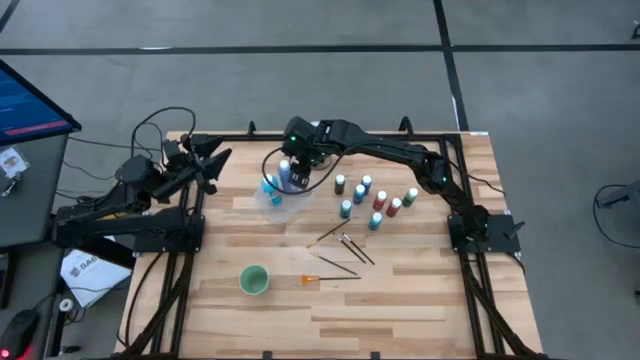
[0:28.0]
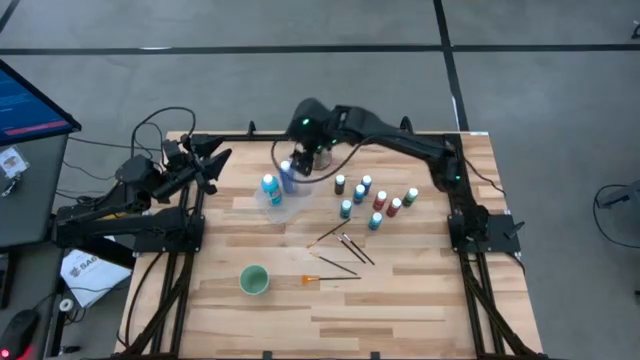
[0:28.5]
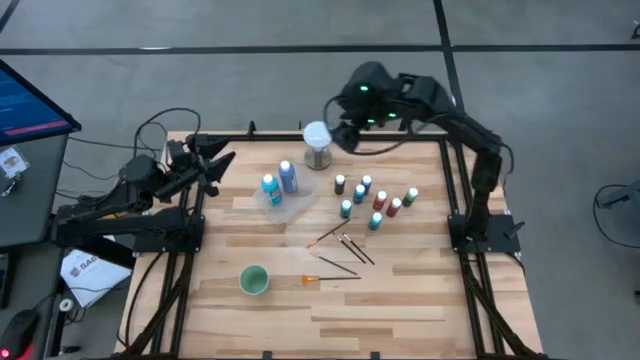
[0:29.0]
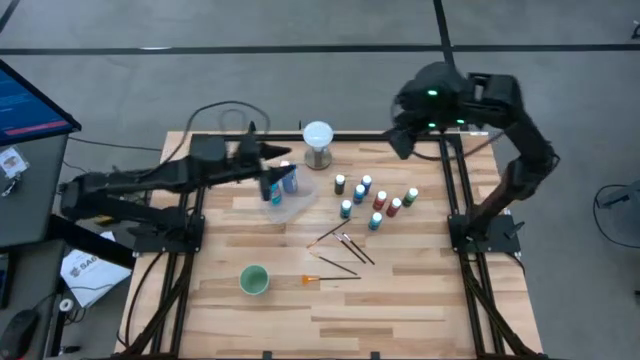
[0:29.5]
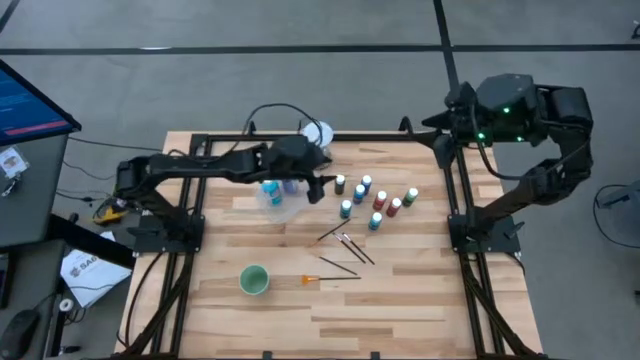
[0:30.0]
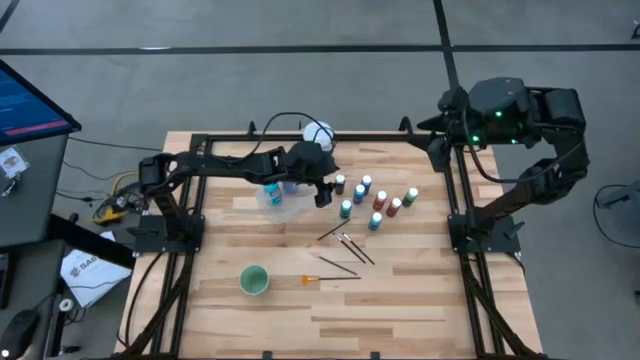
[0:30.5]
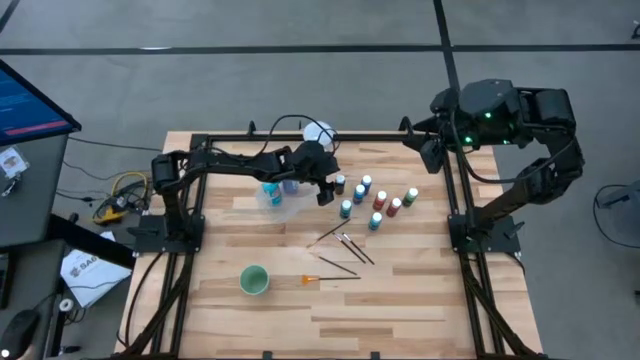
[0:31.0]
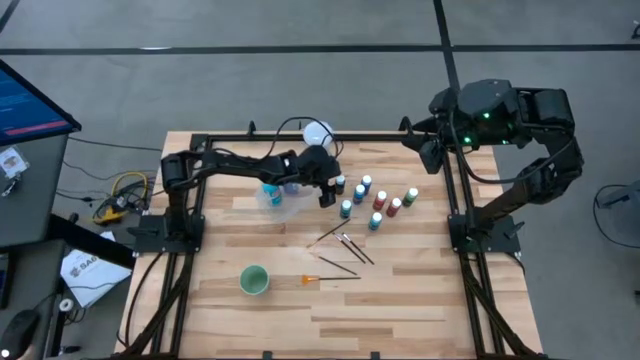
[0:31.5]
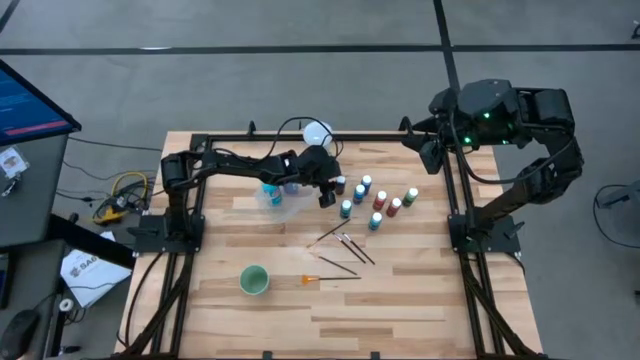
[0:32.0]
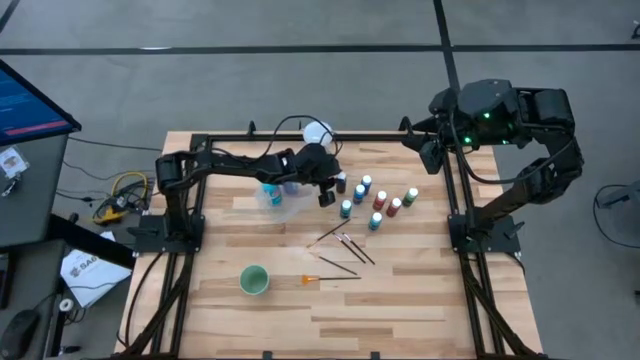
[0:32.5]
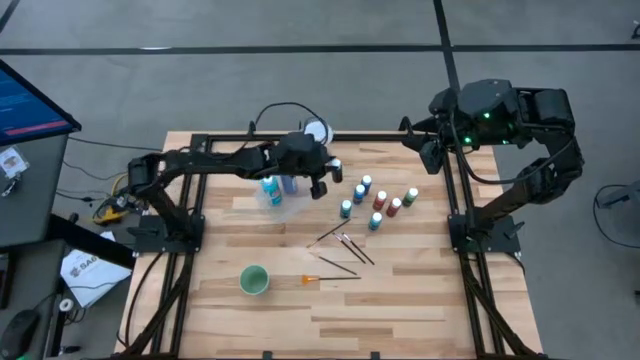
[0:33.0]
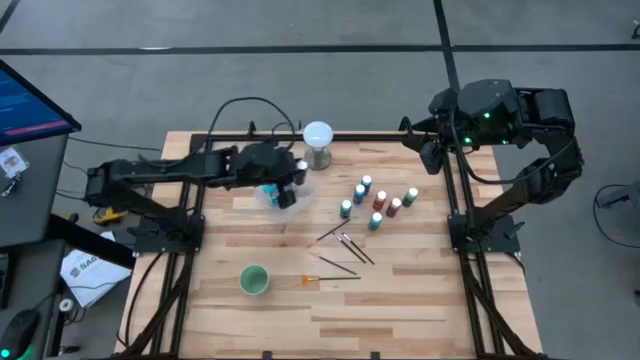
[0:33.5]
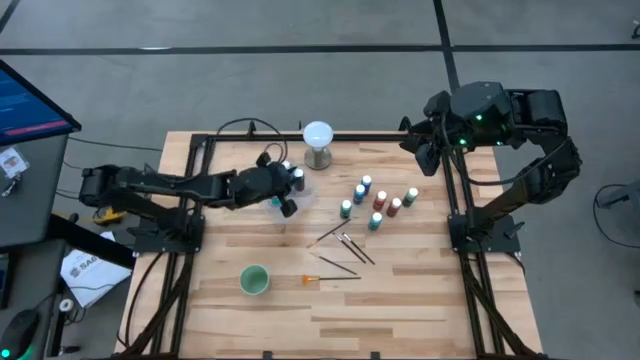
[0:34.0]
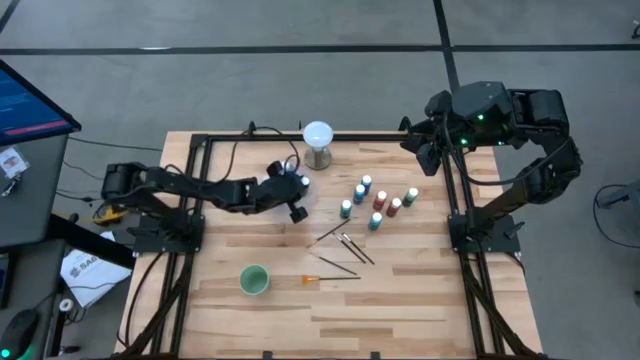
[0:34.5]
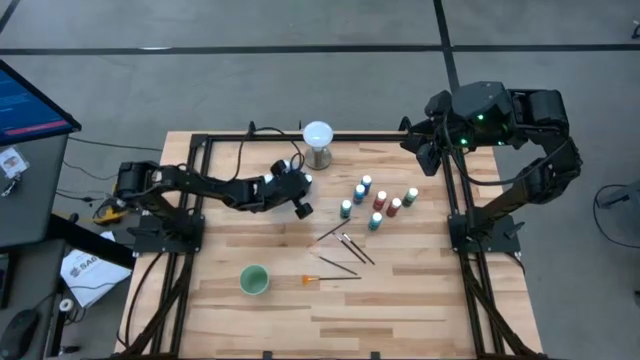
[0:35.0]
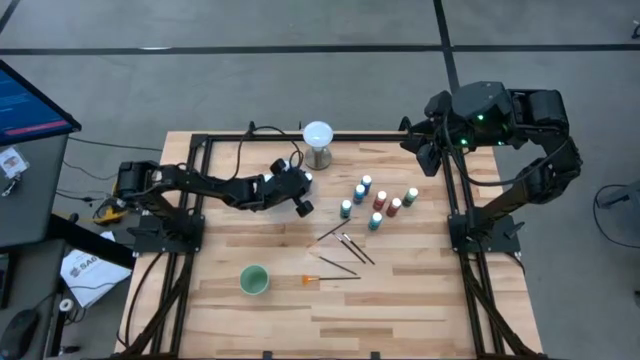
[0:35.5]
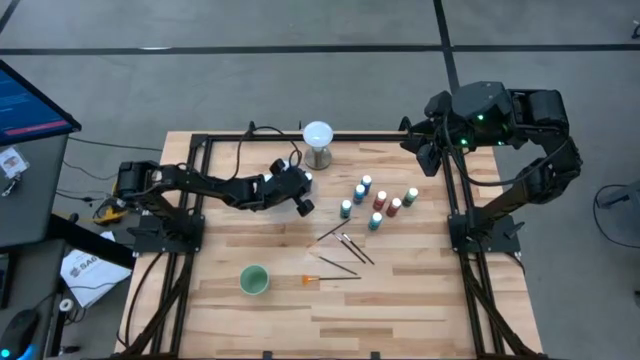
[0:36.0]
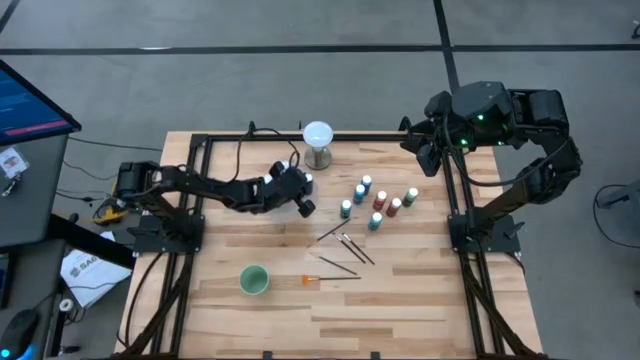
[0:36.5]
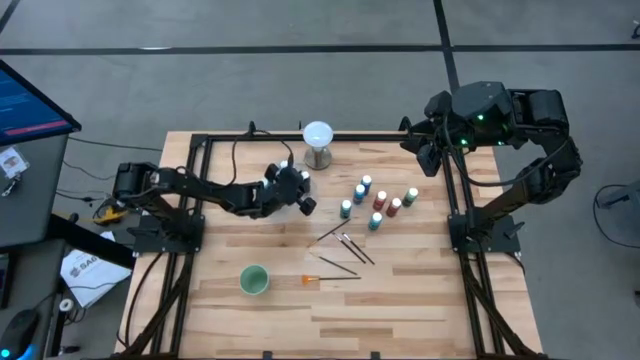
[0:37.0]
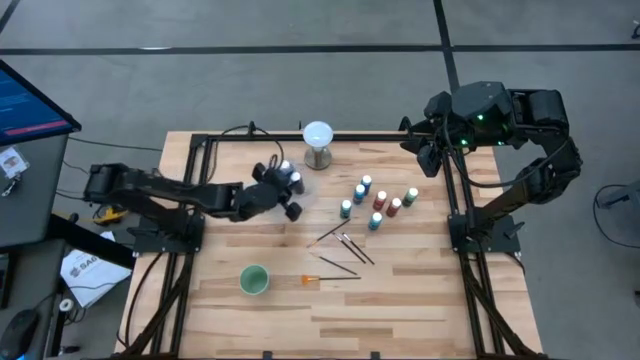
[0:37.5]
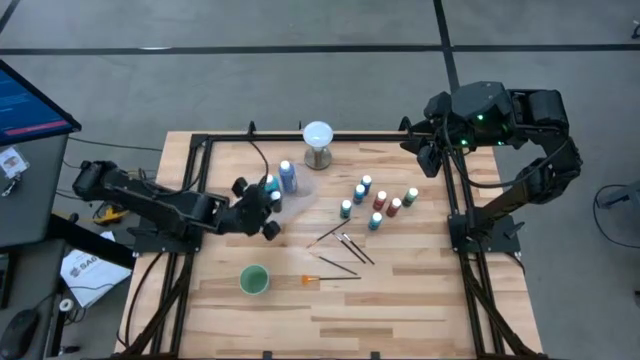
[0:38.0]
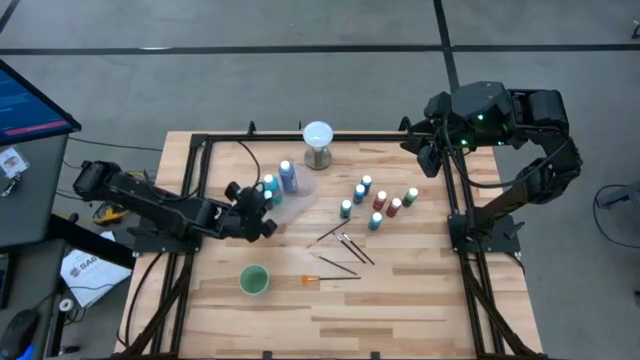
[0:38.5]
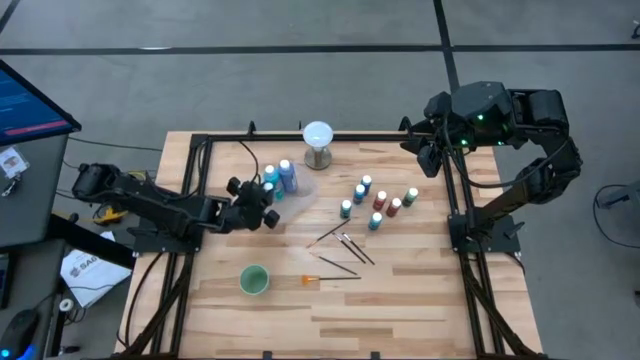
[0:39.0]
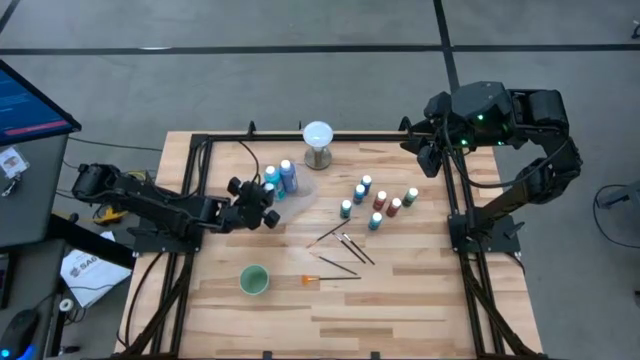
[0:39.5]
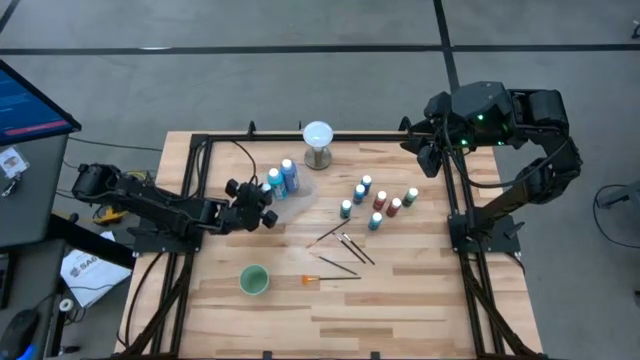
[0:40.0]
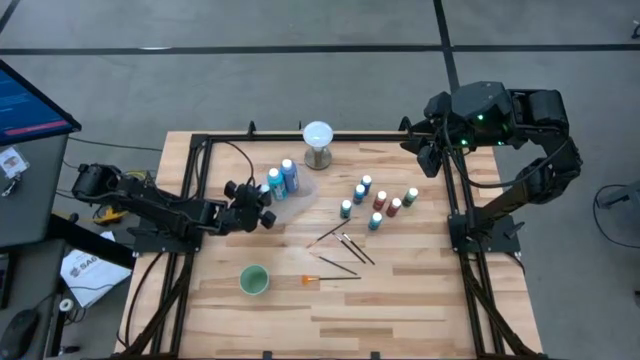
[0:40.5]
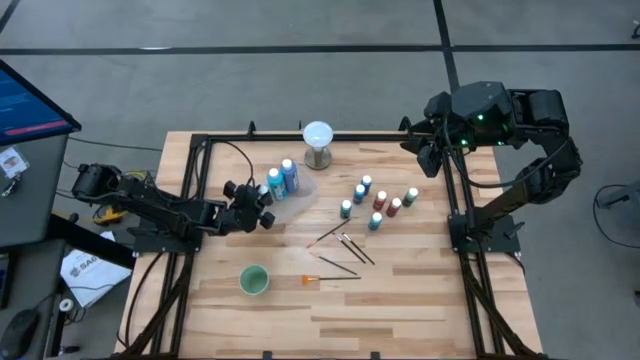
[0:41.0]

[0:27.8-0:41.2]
Task: Pick & Place Paint Supplies
Put the small black bottle into the white bin

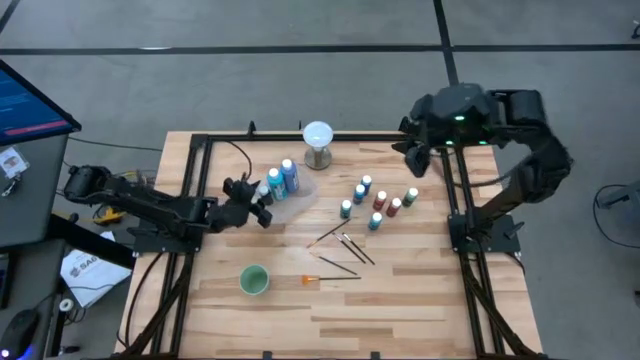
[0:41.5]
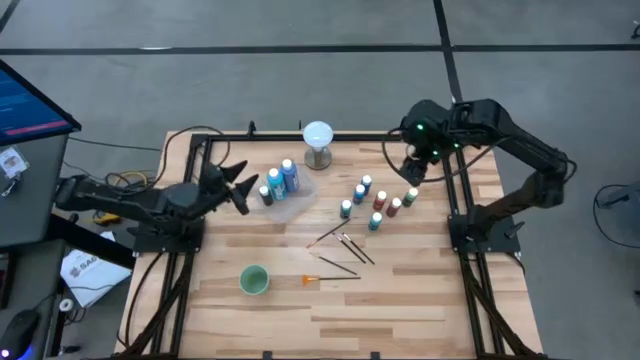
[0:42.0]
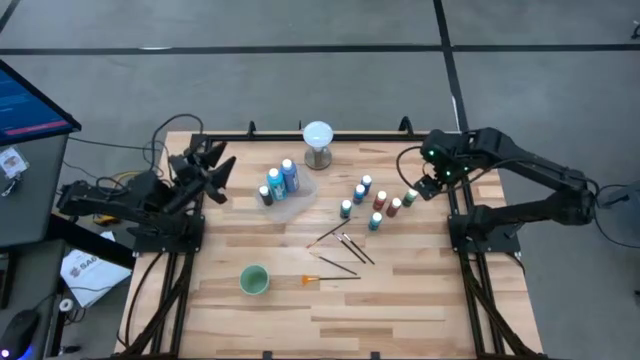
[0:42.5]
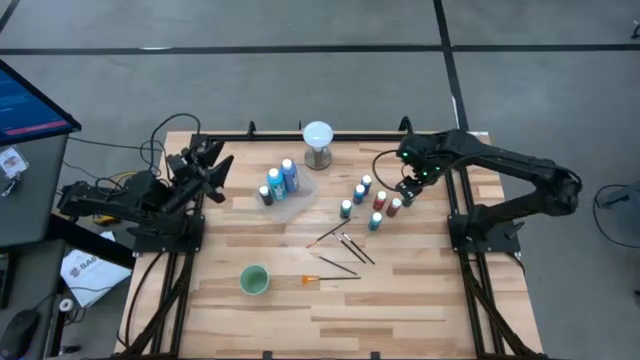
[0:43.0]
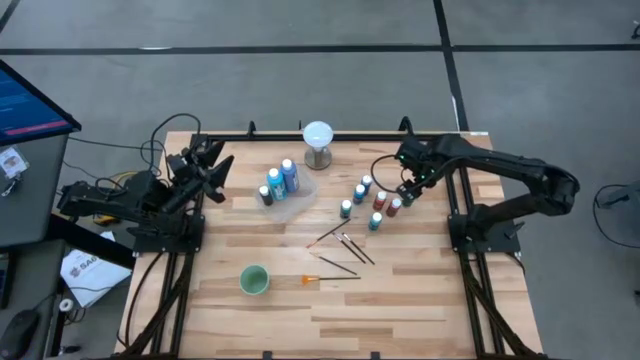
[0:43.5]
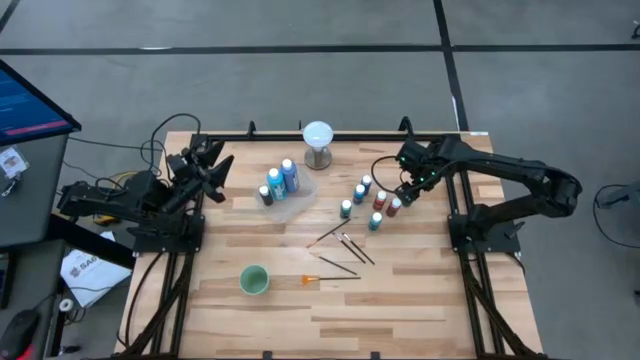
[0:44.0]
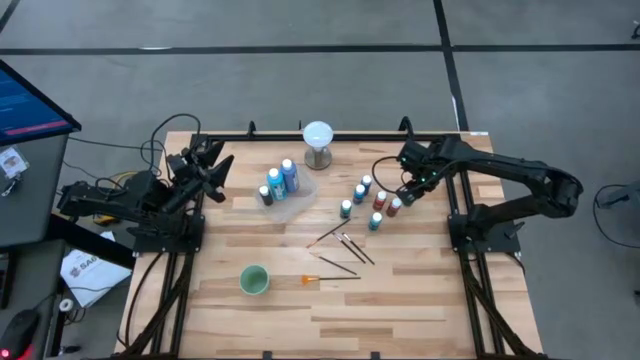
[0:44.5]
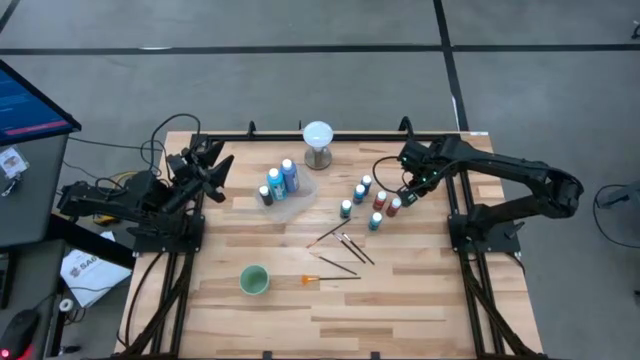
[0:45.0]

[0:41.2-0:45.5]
Put the small green bottle into the white bin

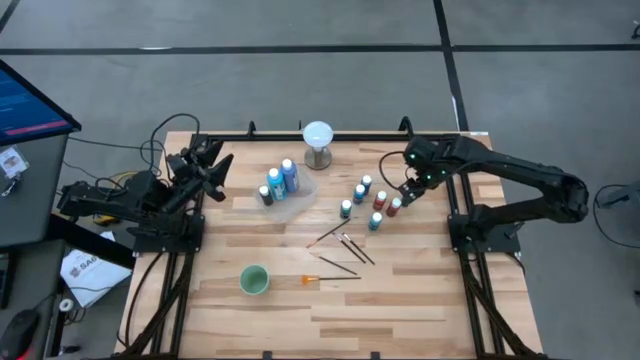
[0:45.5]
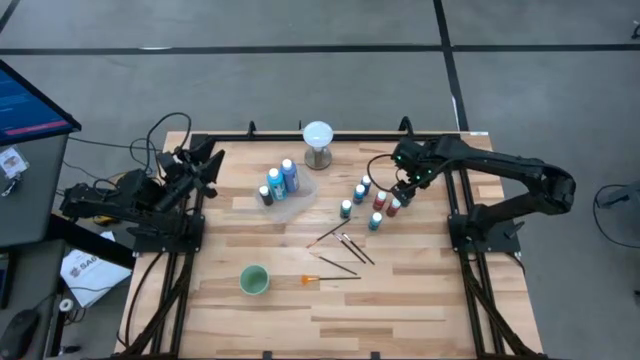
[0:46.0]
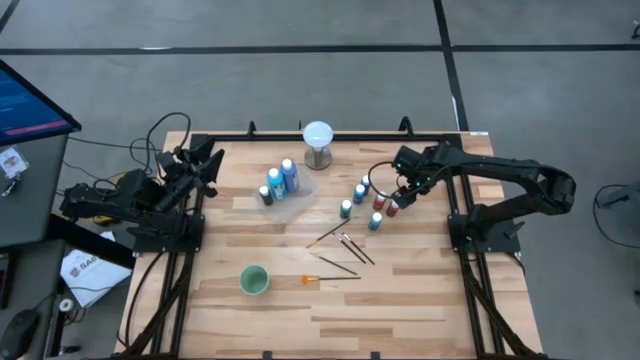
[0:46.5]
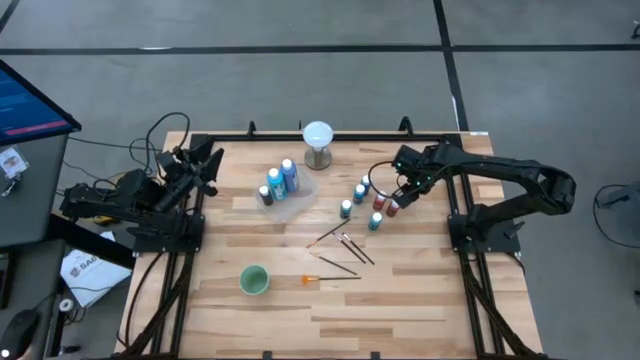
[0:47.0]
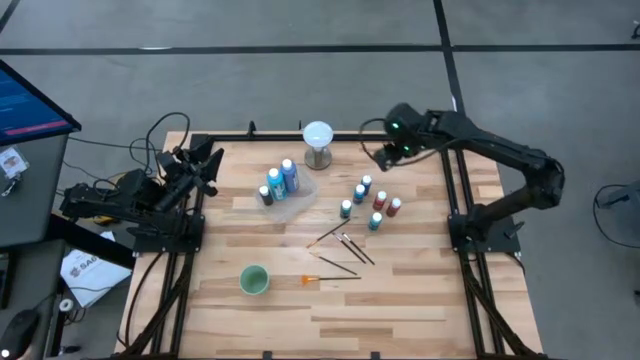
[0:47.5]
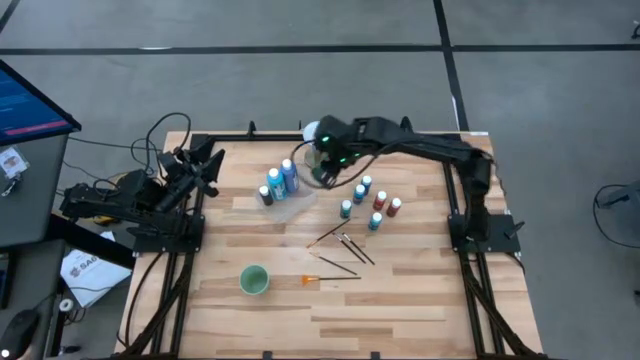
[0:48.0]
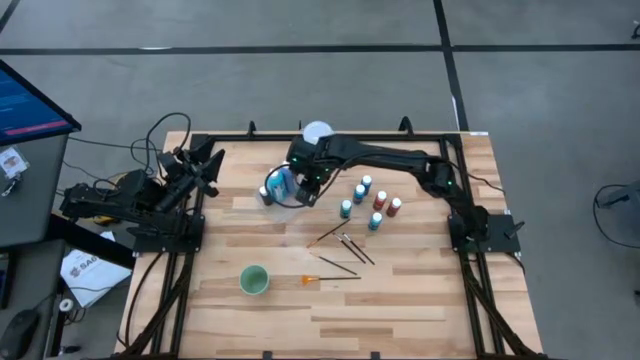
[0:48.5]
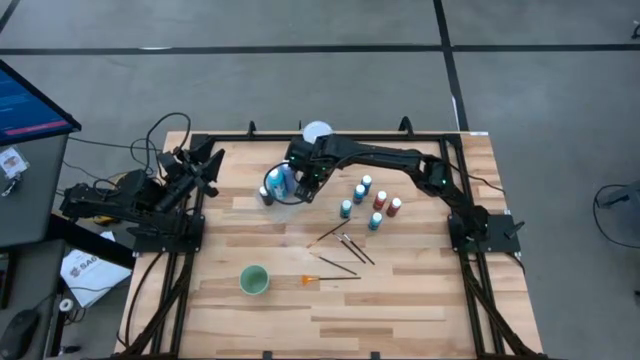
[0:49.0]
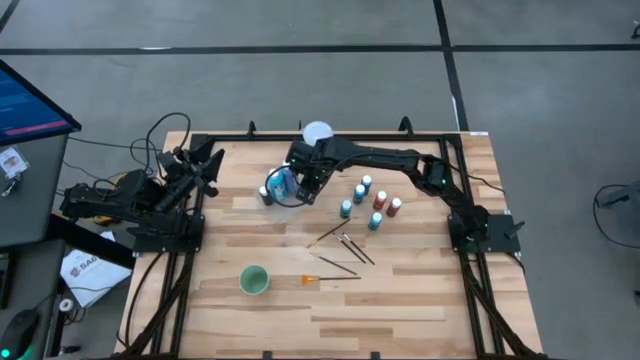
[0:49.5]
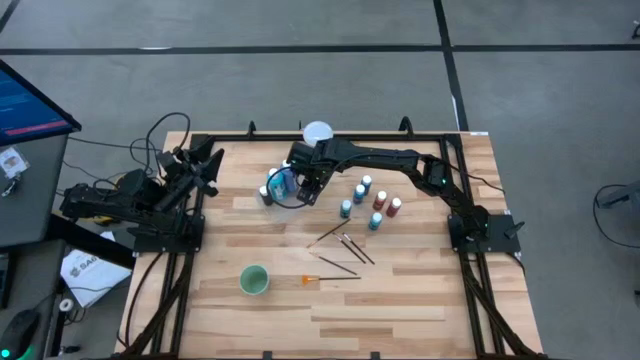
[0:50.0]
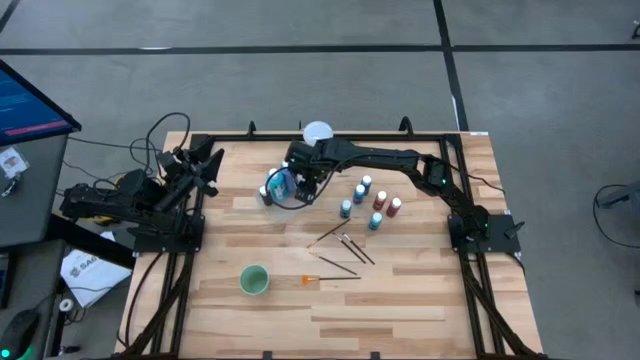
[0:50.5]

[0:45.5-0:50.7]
Put the small green bottle into the white bin
